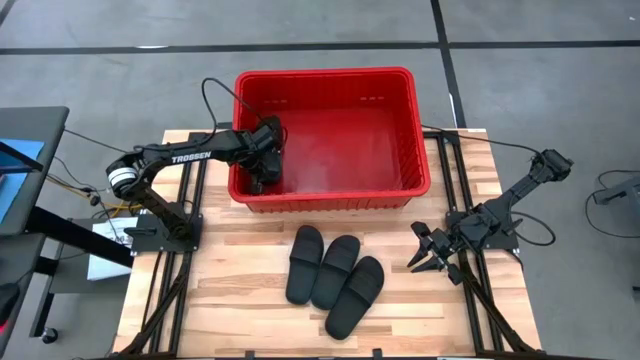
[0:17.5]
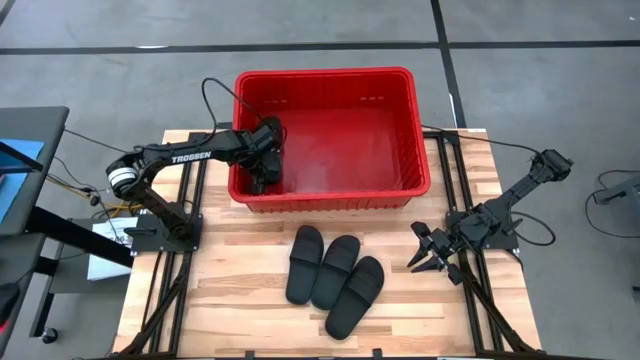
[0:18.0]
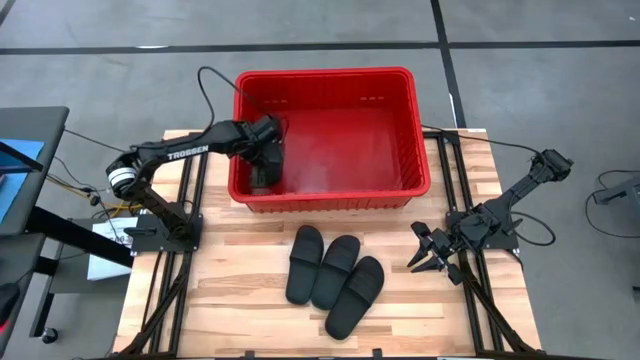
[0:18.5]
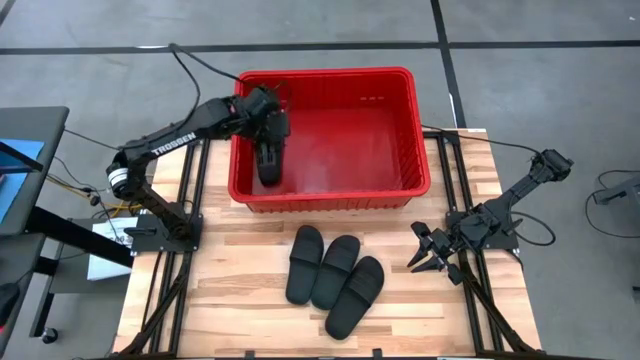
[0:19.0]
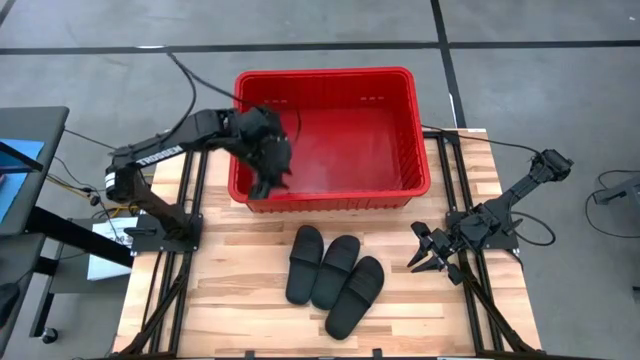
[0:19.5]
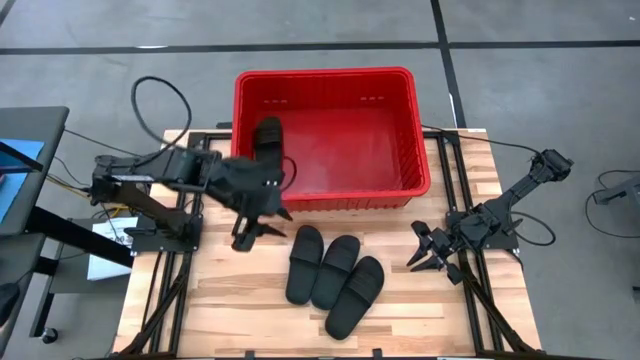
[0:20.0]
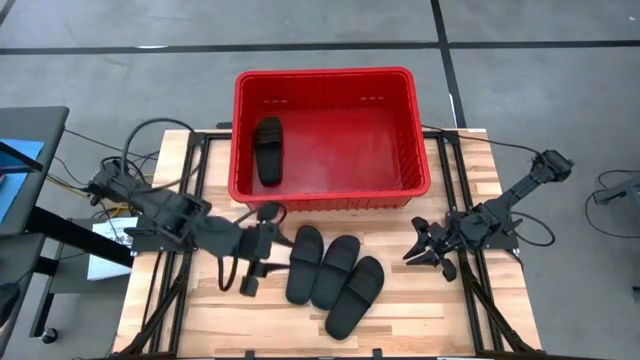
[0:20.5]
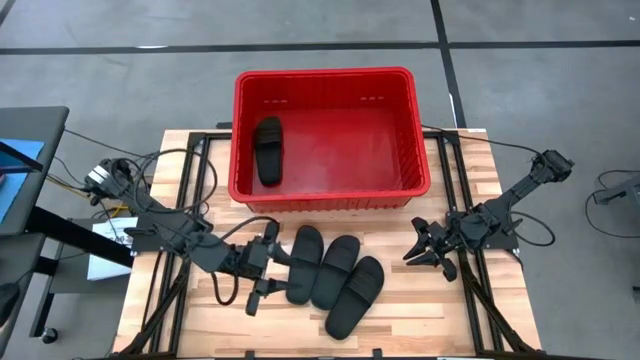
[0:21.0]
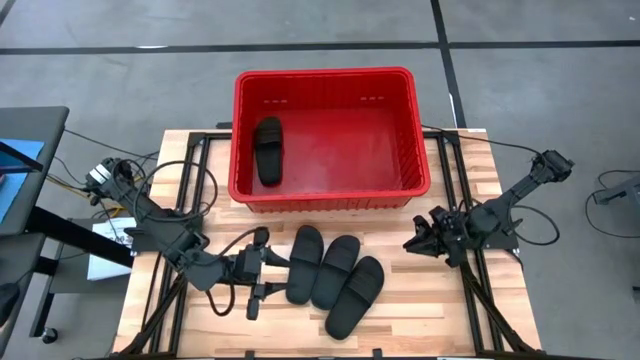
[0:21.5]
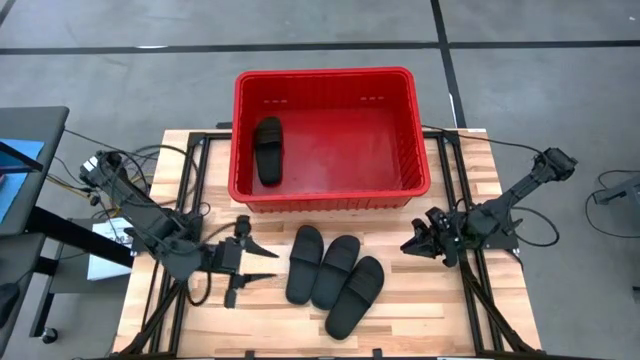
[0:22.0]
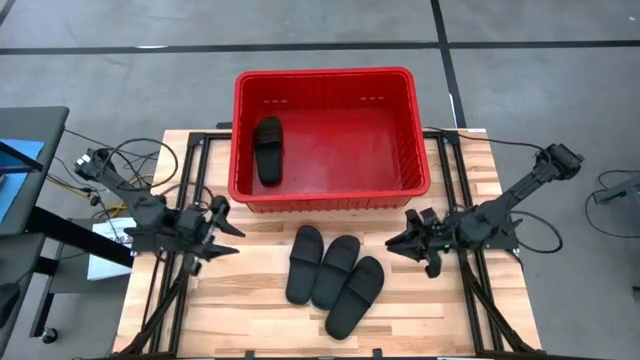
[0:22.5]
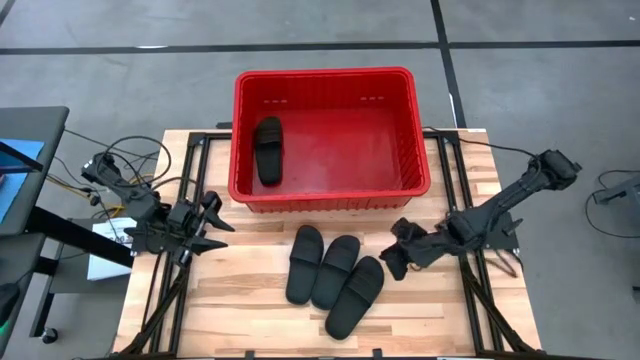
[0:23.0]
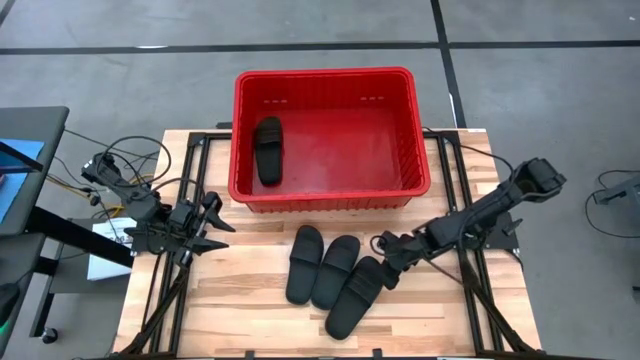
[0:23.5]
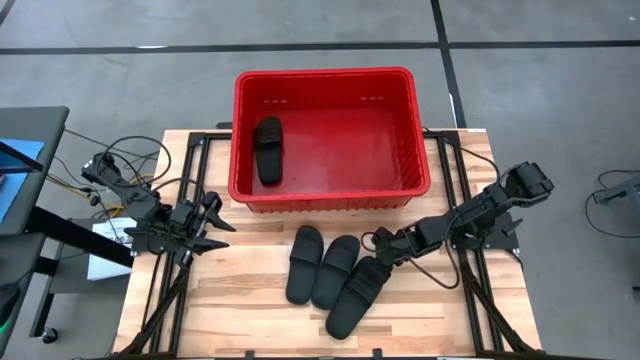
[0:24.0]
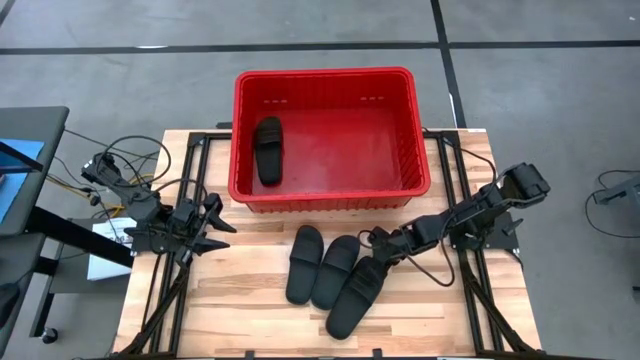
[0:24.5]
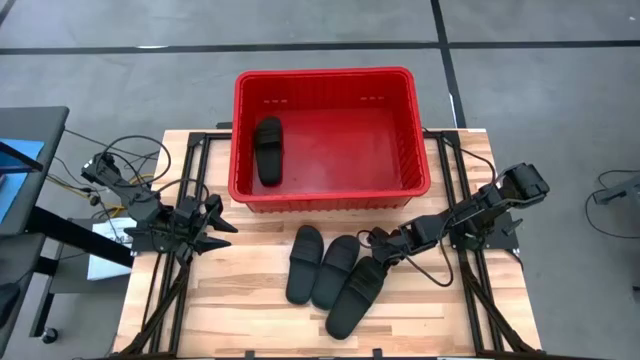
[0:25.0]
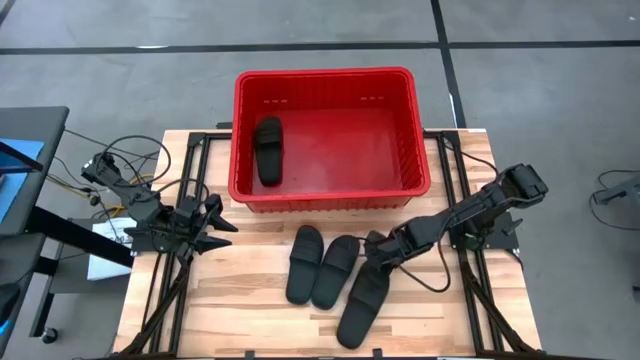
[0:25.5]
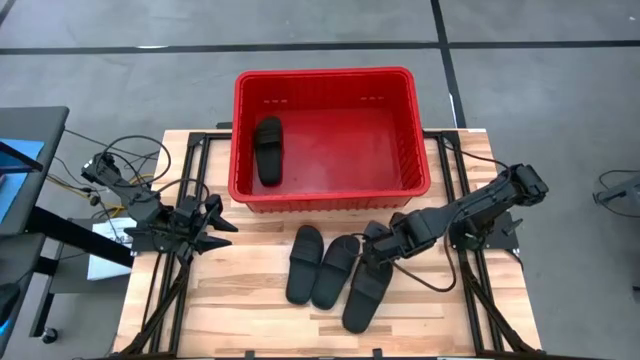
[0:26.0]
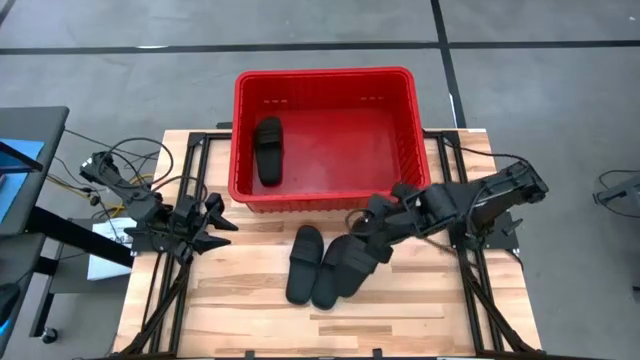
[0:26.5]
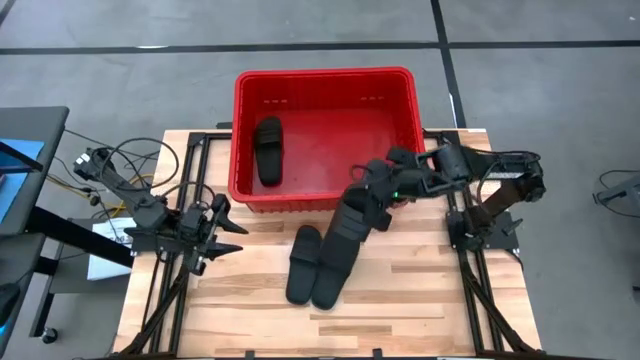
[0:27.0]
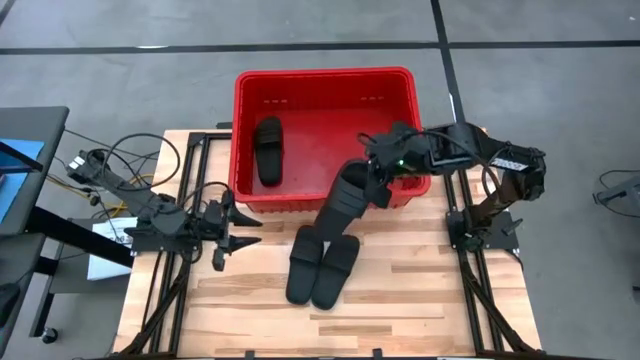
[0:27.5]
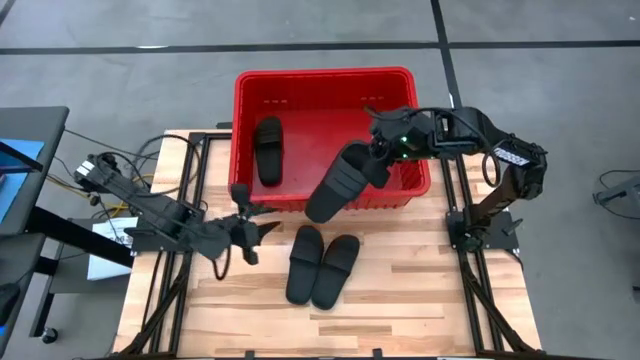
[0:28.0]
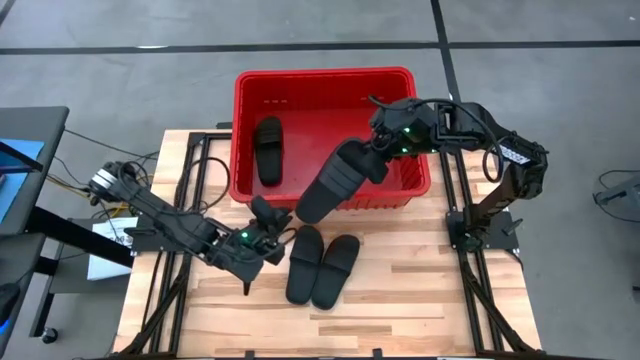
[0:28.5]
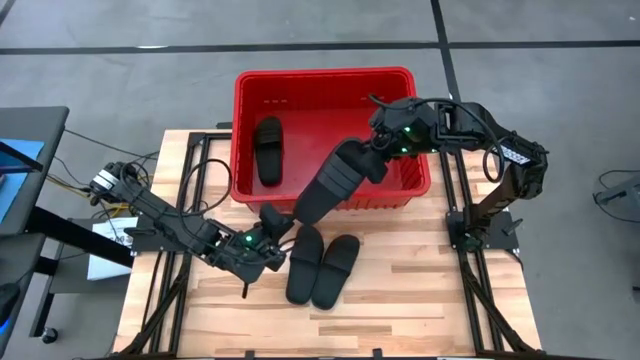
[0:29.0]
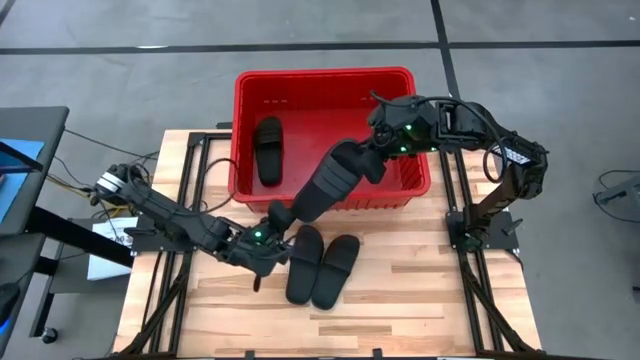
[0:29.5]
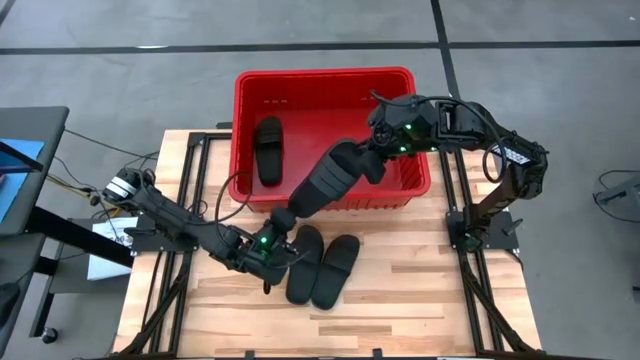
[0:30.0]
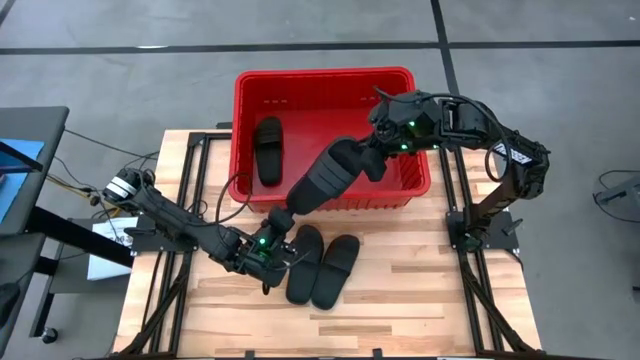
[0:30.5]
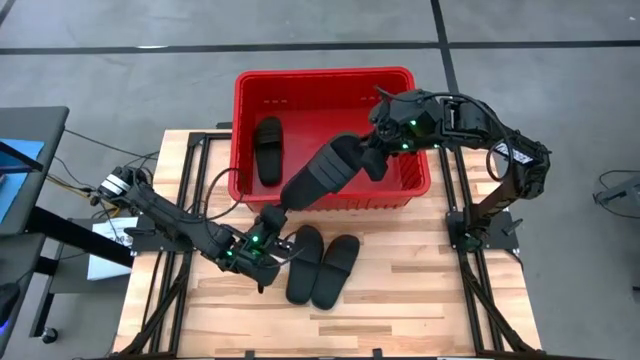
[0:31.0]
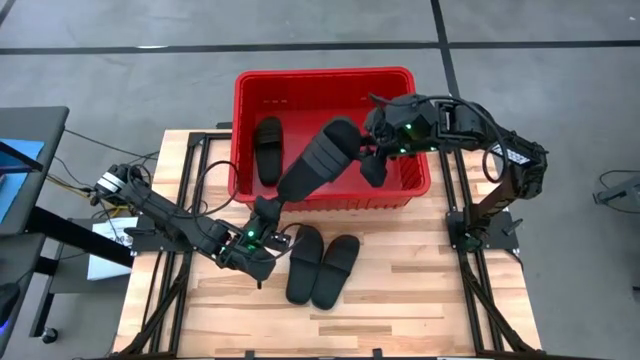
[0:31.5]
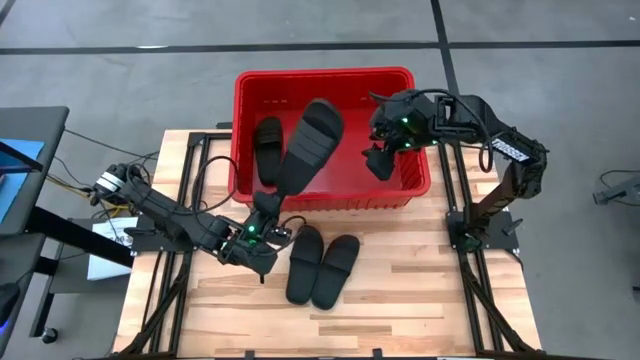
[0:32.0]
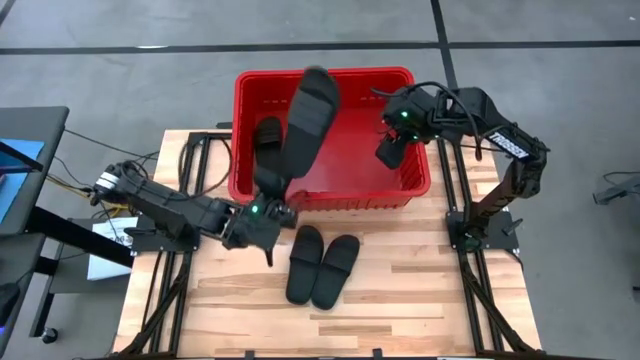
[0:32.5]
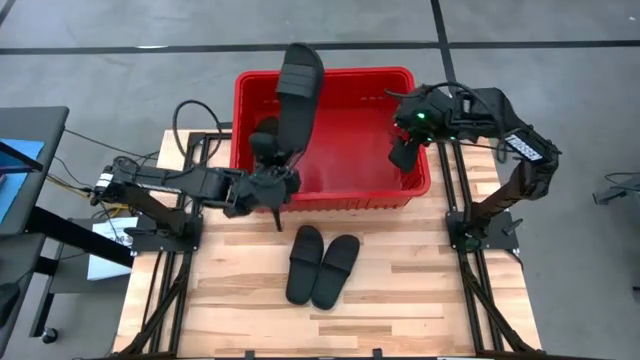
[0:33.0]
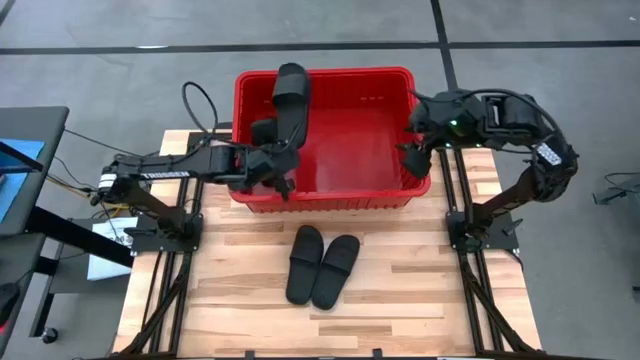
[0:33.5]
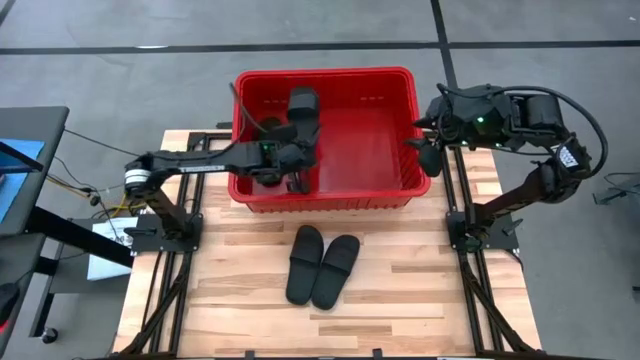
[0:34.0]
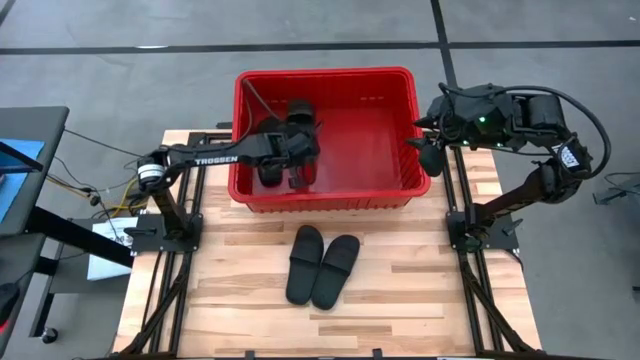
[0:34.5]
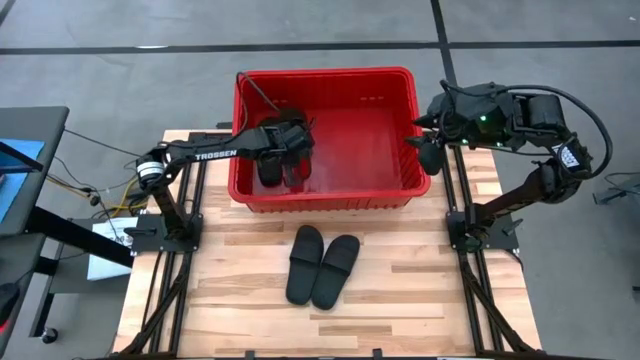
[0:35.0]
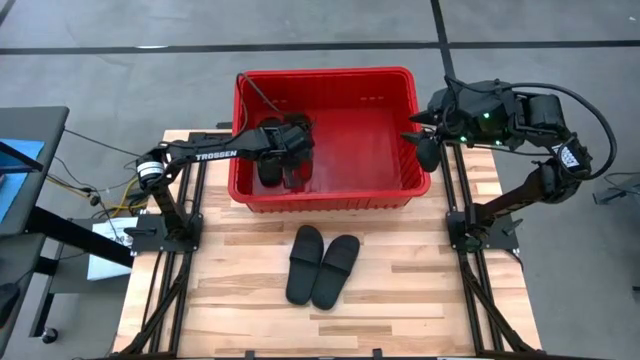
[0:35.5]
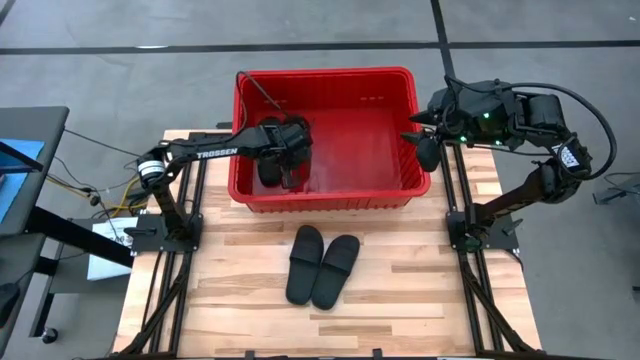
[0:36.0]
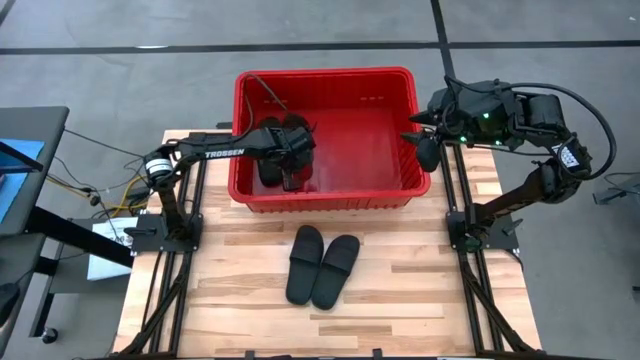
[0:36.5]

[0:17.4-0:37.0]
Task: Pick and place slides into bin
Put the black slide into the red container

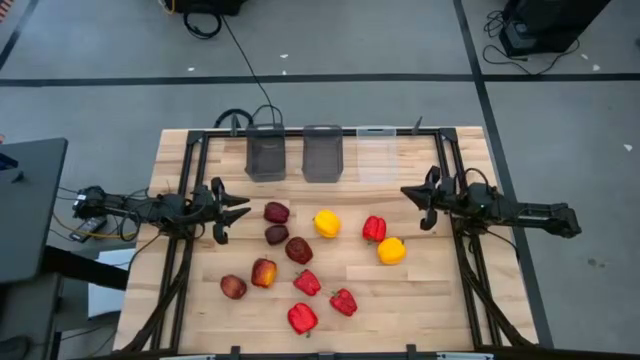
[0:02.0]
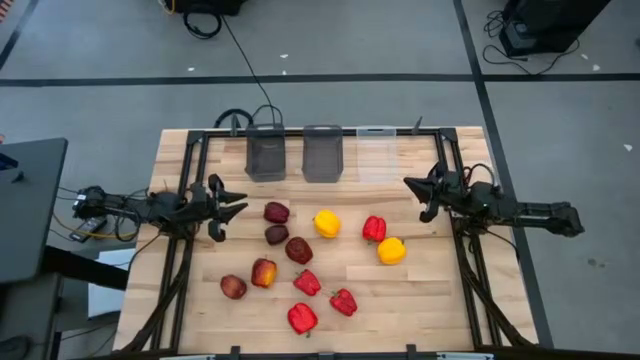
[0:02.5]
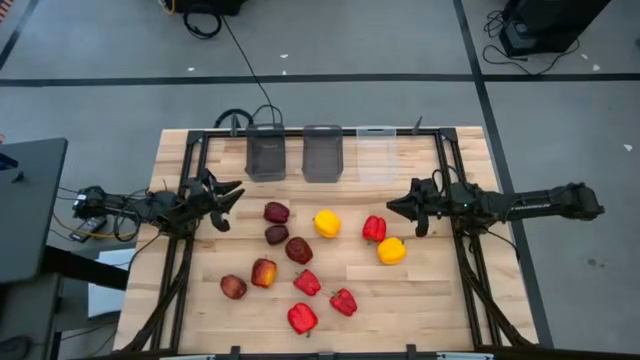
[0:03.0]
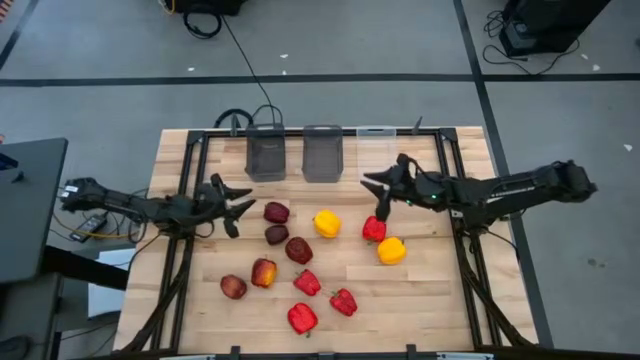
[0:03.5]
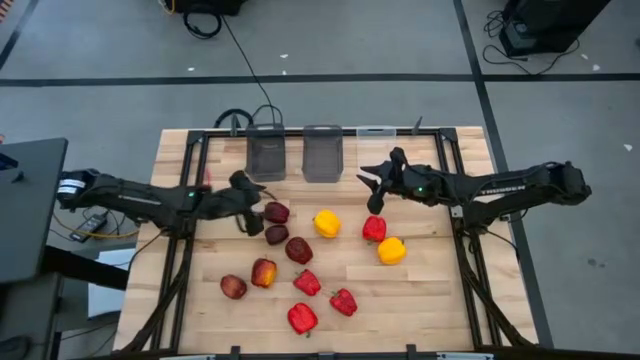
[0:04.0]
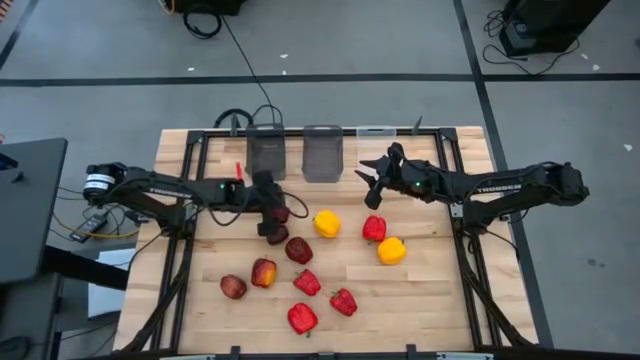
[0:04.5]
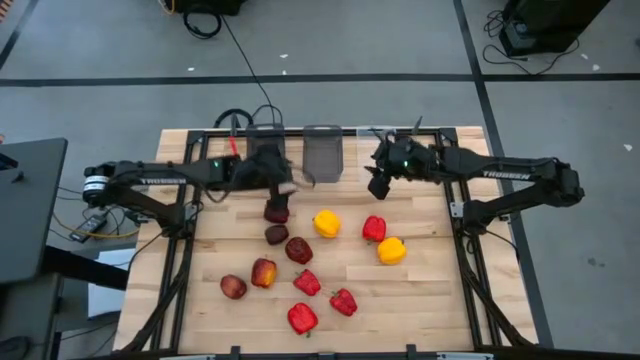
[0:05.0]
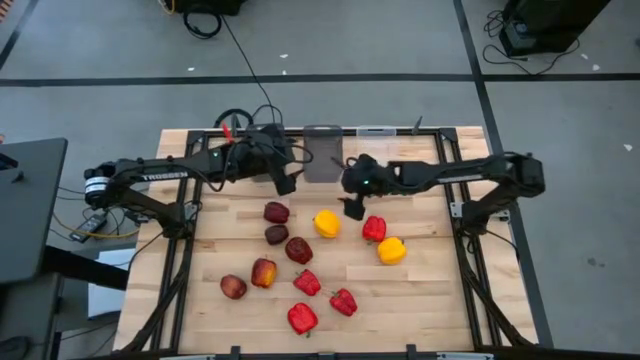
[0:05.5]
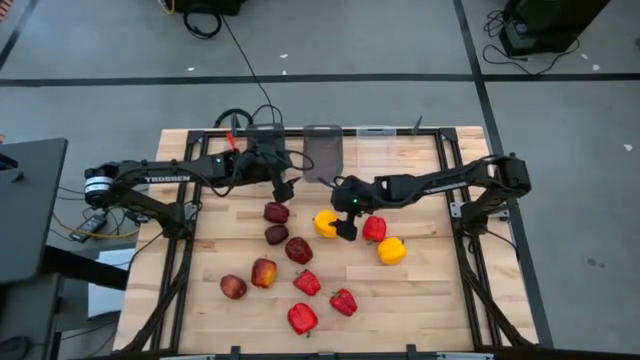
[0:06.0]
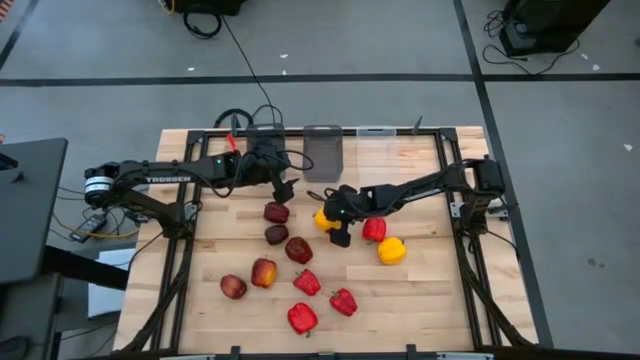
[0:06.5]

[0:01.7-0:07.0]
Task: Sort produce into baskets
Put the yellow bell pepper into the transparent bin
